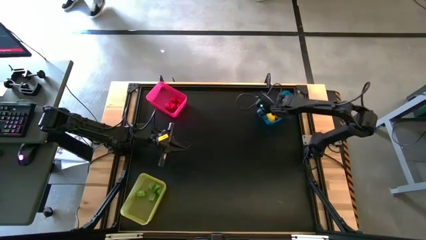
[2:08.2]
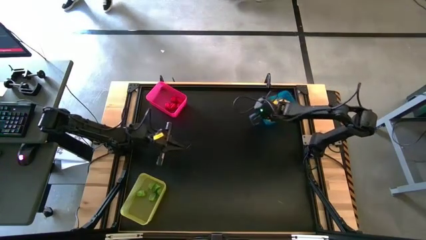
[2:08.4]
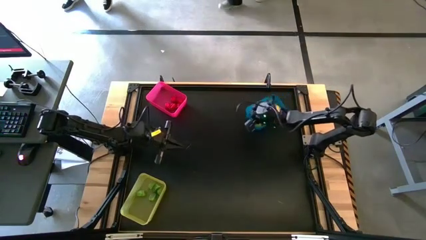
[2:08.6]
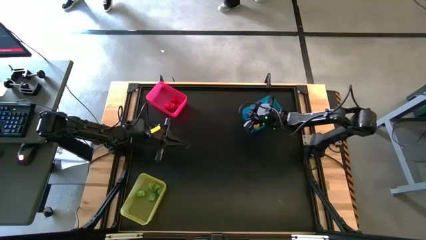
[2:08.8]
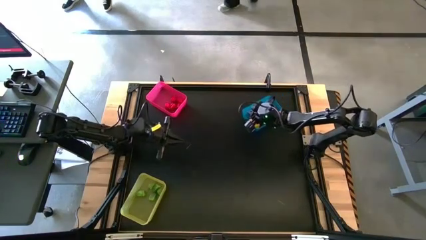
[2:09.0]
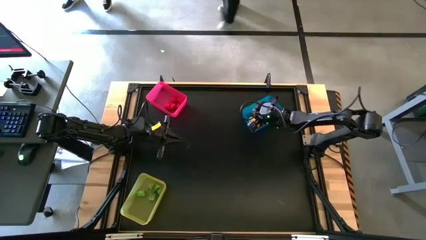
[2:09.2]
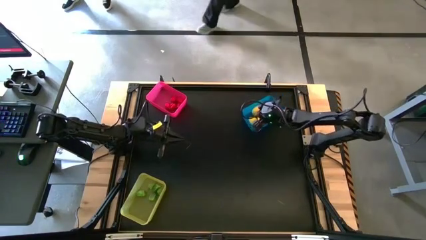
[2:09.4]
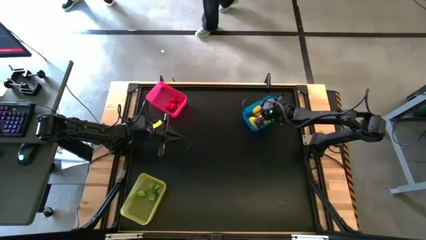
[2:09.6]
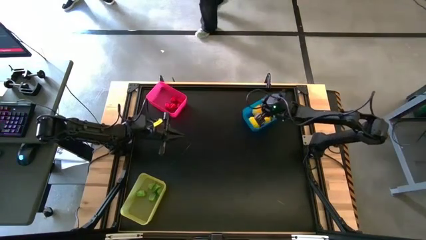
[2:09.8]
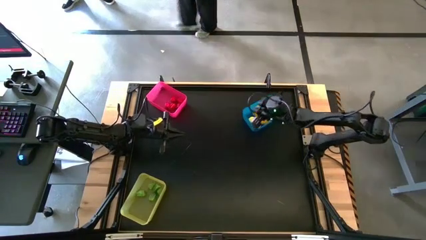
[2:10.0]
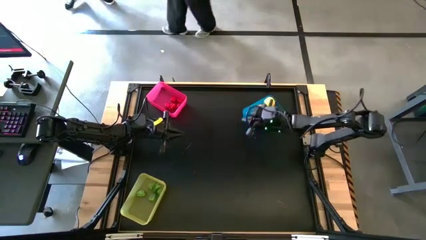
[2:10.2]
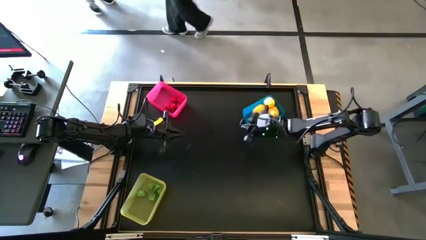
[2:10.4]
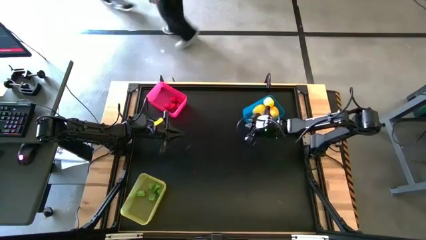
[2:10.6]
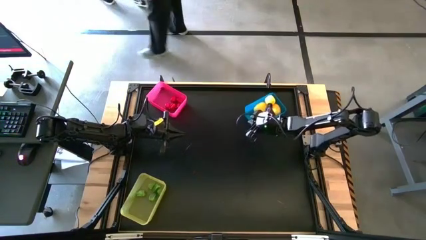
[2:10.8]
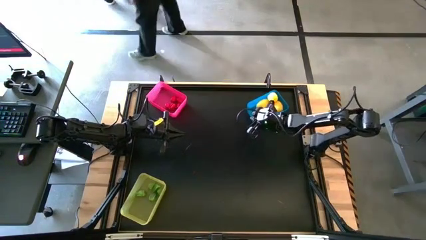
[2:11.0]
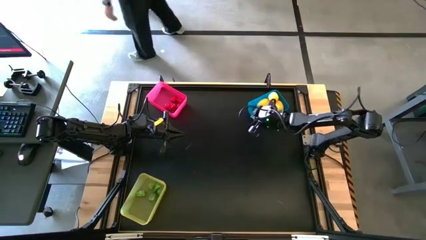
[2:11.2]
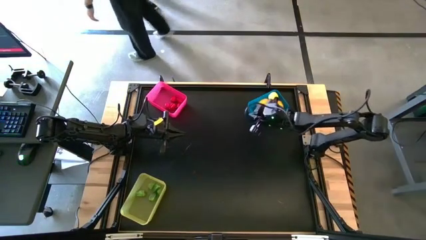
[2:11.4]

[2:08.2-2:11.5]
Task: Sort produce into baskets
Adjust the blue bin

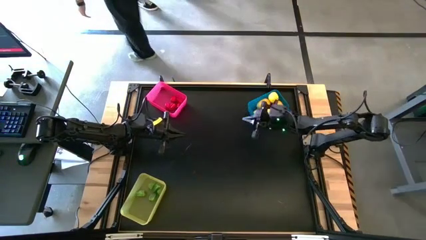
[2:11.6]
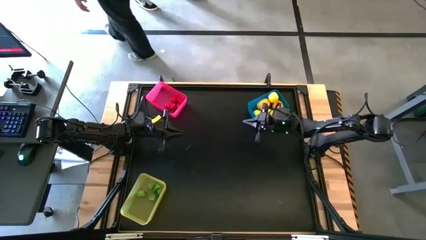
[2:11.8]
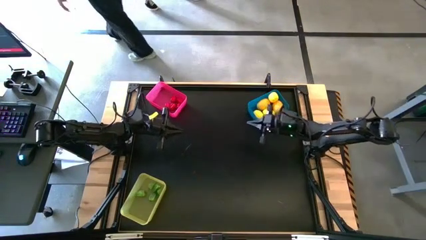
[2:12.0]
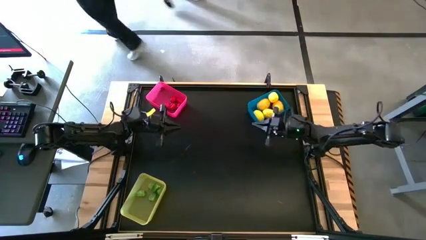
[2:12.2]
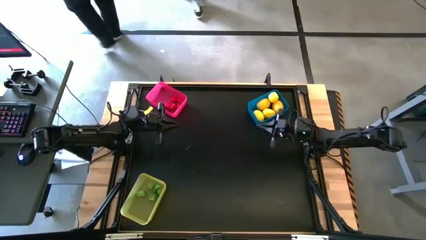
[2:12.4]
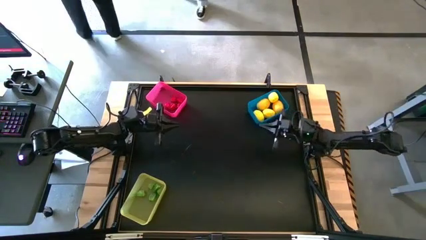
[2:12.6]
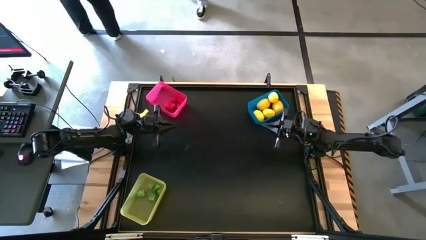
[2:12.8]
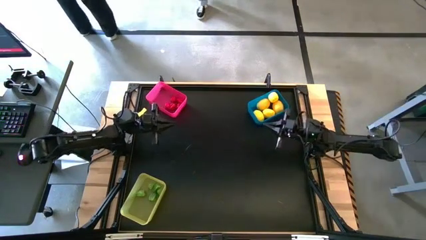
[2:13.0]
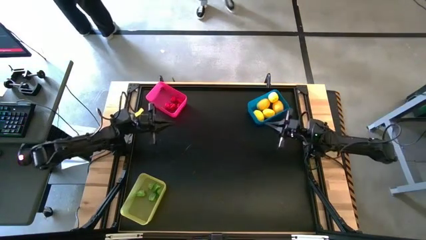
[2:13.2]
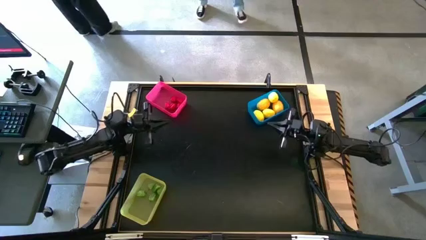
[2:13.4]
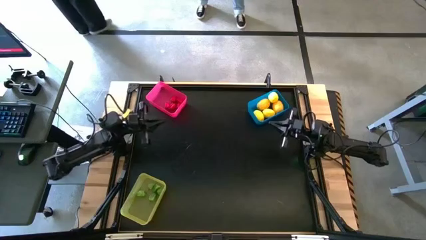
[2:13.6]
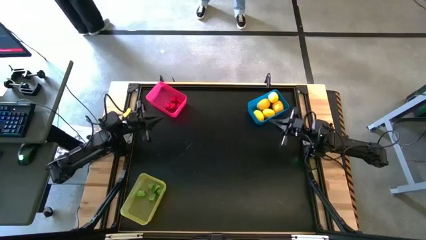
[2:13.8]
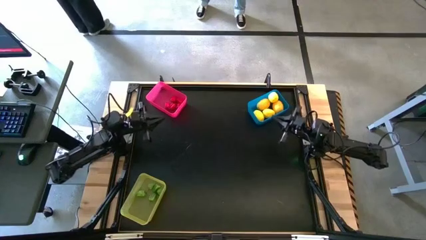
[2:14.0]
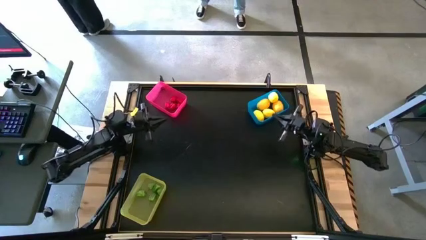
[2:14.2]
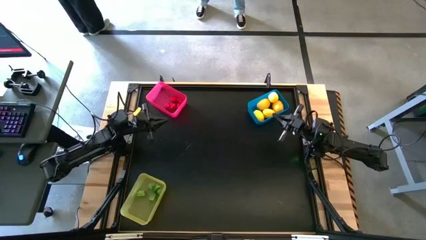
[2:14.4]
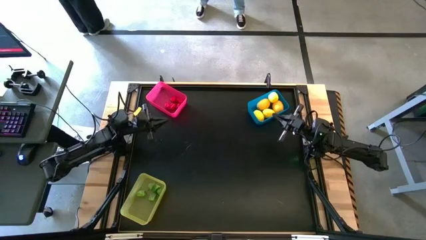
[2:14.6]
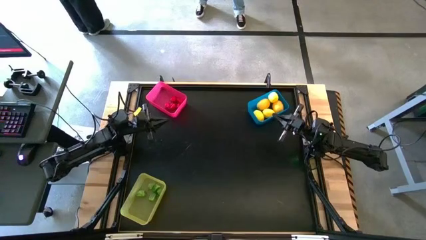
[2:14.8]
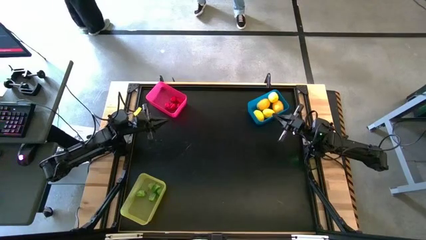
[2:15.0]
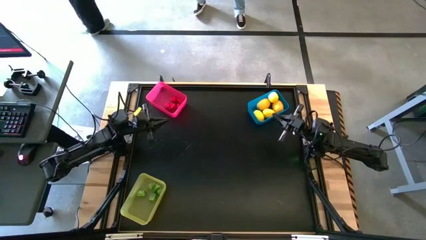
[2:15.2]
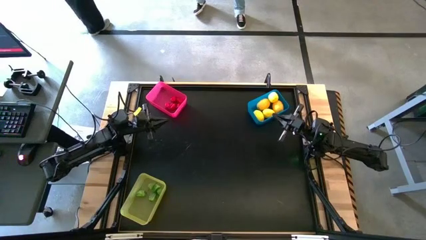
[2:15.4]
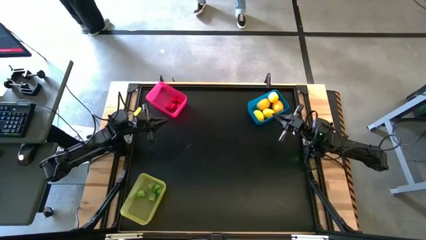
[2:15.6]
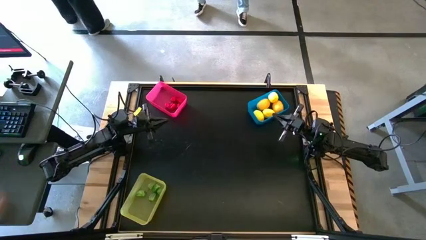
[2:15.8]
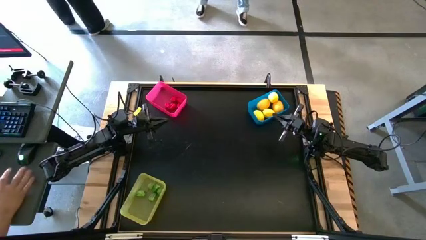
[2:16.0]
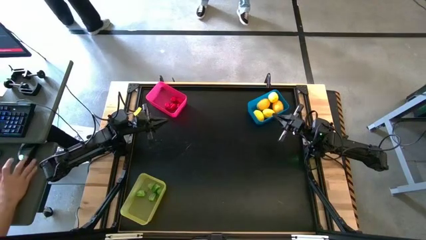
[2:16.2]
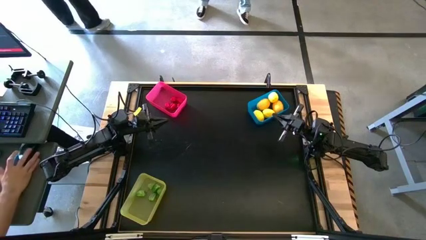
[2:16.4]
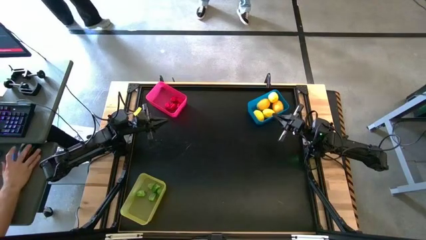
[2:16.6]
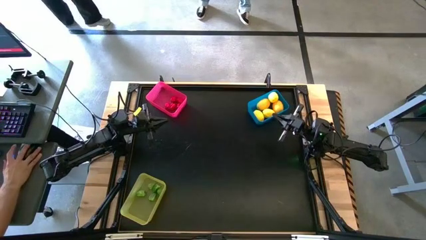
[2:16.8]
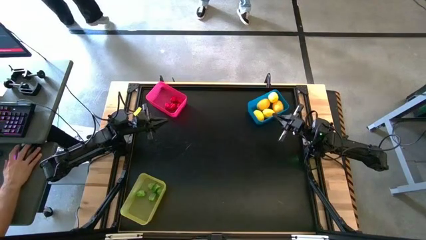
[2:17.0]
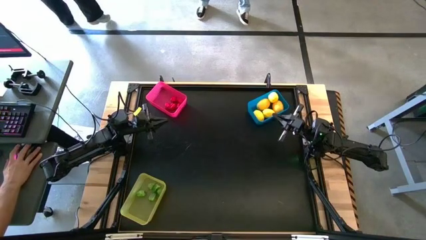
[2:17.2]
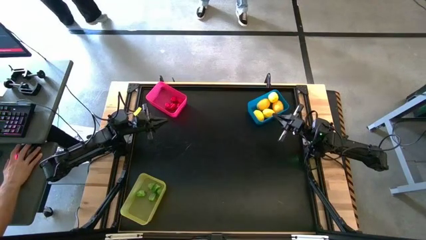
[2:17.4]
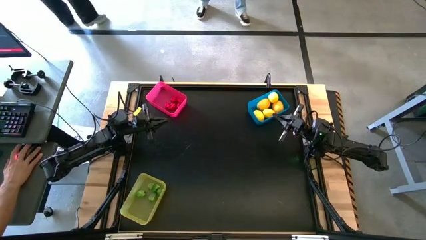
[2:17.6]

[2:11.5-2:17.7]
Return to Home Position

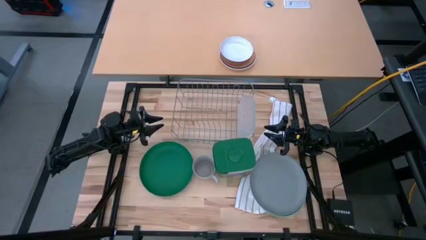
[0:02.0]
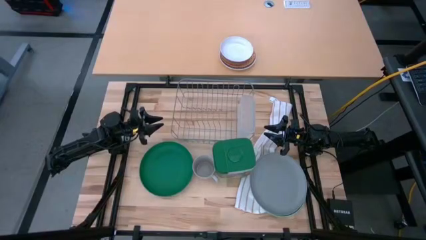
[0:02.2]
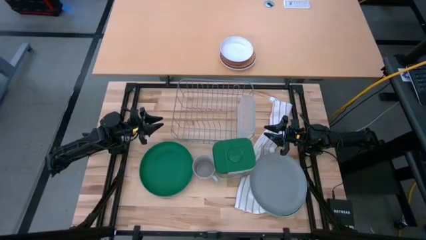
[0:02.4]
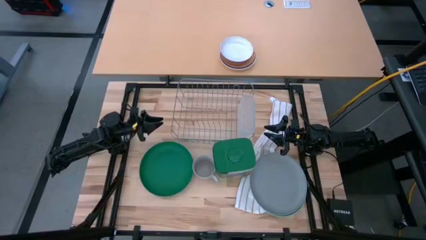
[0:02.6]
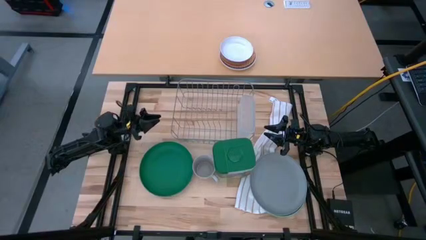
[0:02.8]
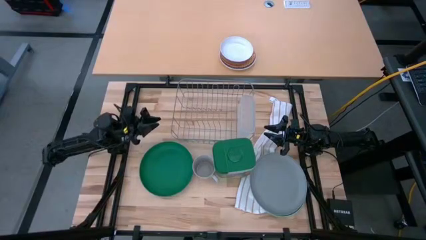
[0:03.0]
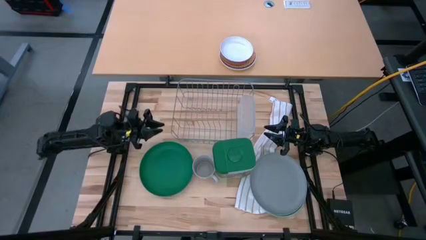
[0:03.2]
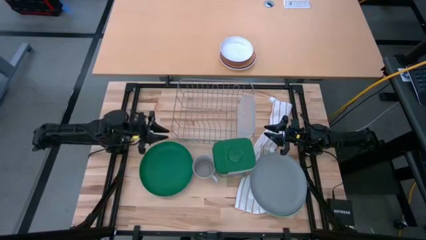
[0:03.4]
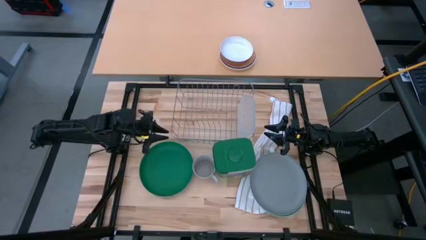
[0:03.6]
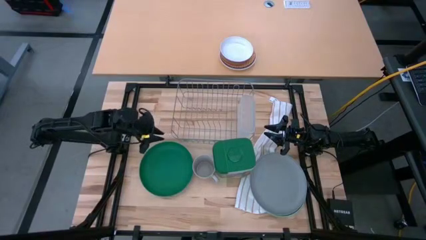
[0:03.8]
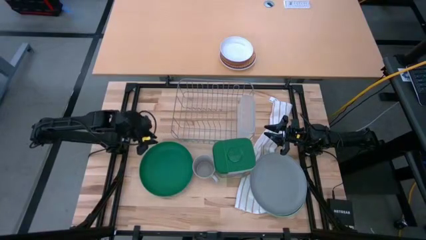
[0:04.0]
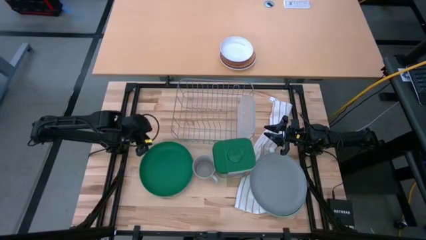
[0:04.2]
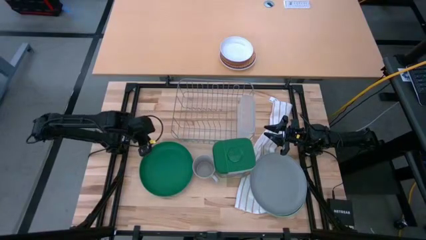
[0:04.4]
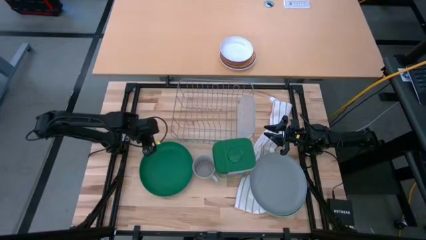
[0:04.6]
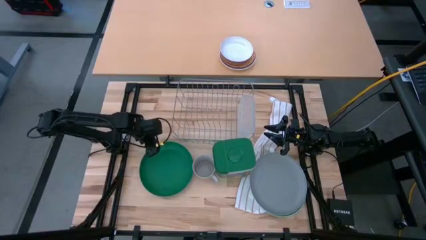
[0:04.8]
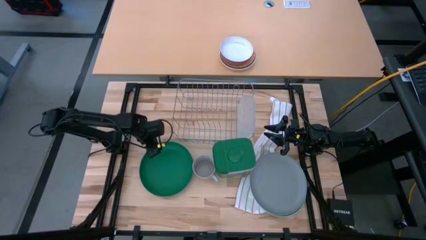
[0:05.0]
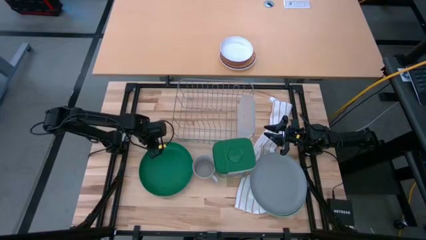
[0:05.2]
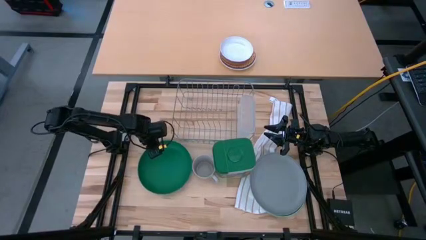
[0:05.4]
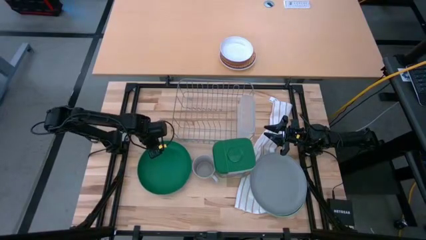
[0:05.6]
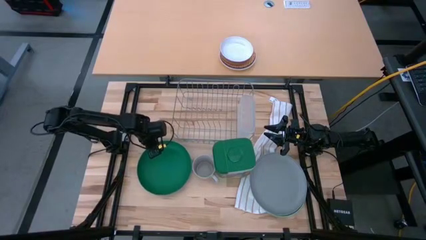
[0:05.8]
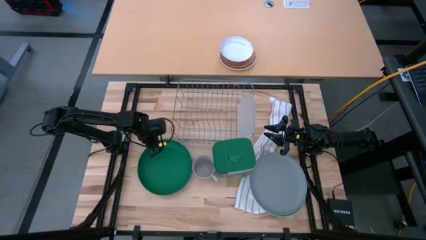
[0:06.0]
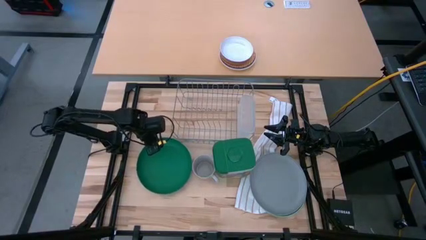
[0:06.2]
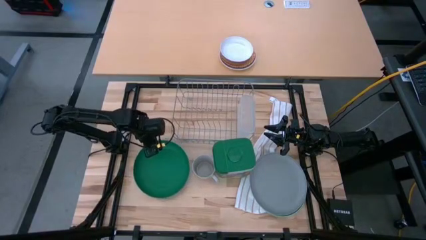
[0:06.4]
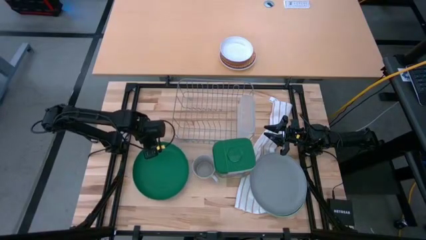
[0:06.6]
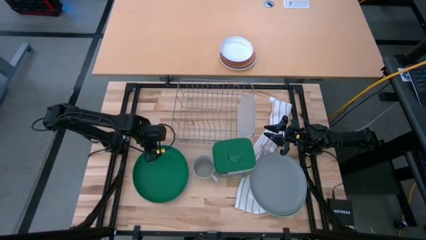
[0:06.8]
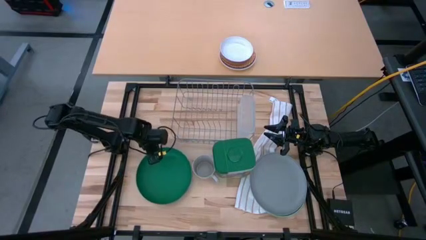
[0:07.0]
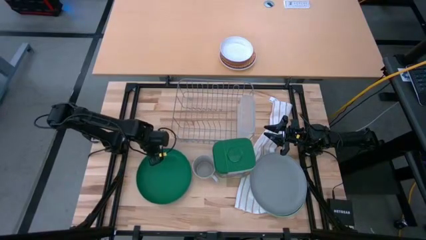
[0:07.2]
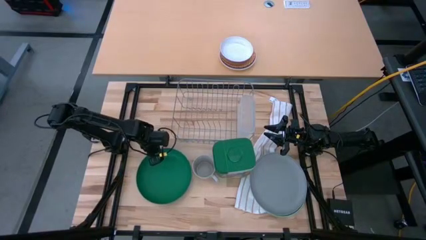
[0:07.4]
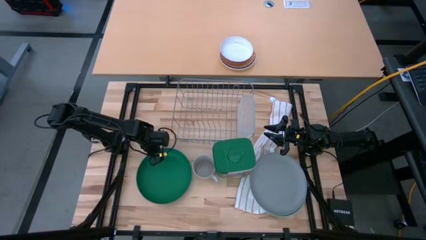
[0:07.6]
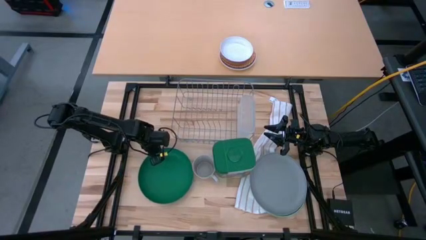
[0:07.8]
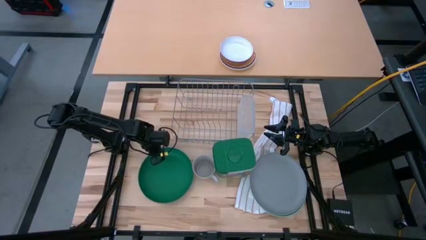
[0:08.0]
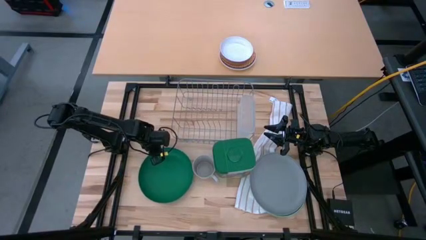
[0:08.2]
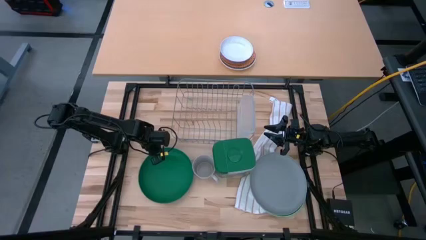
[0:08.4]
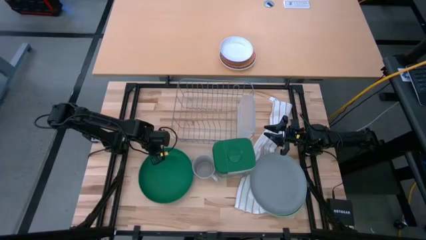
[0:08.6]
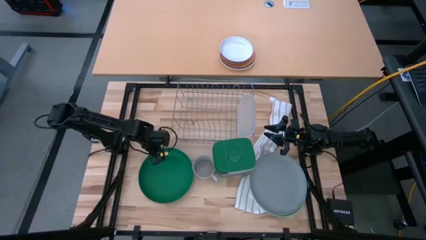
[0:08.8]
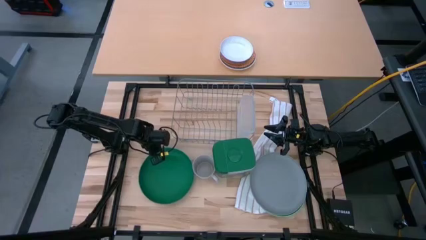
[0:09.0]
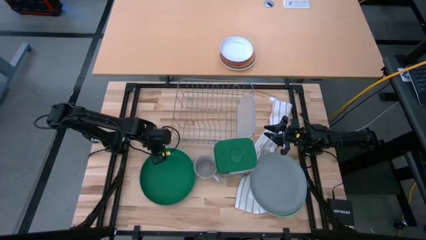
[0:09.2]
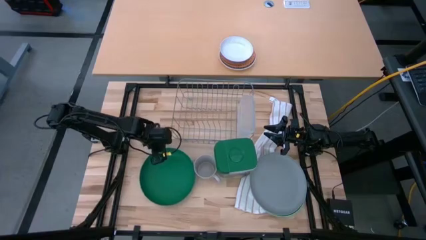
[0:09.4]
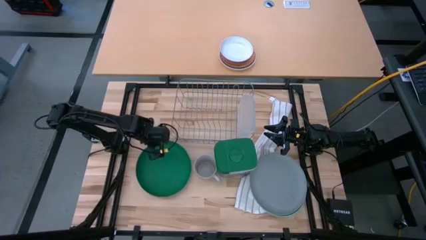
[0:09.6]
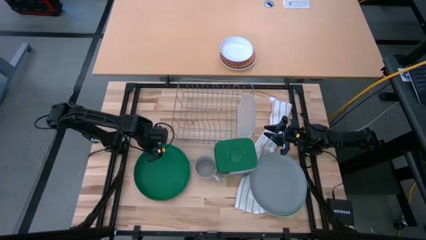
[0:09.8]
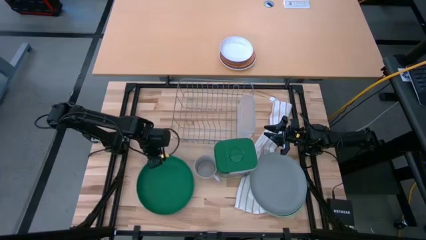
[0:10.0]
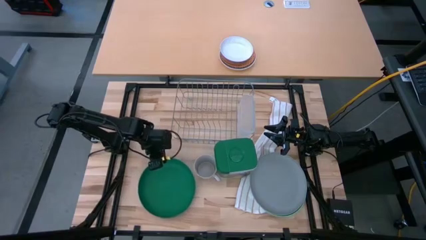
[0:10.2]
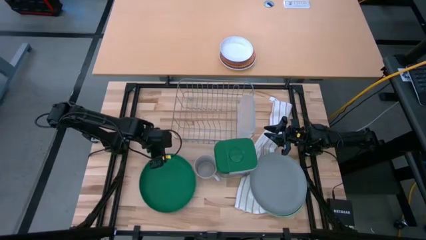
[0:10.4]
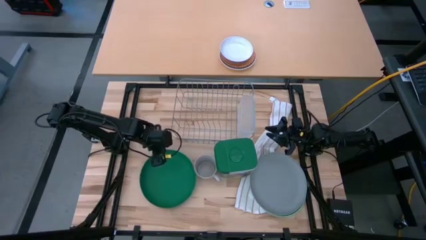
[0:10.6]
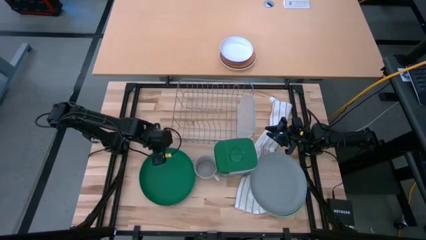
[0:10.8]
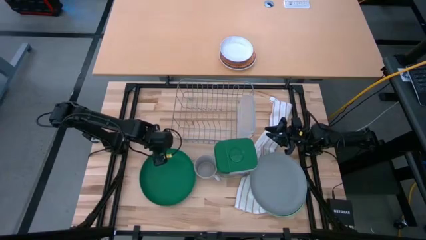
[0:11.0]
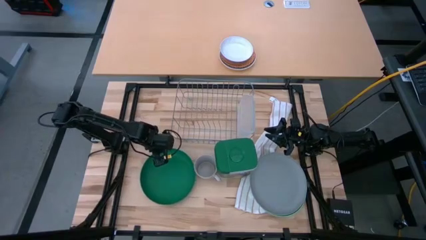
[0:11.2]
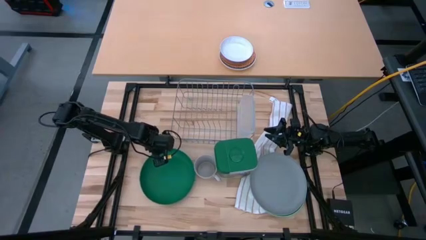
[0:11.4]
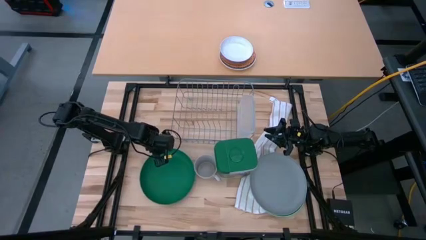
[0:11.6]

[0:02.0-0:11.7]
Task: Sort dishes
Put the green plate in the dish rack
